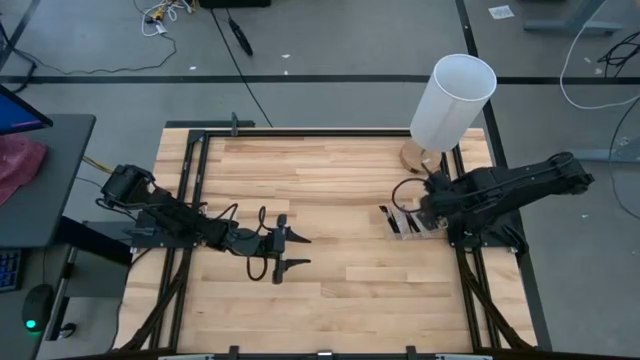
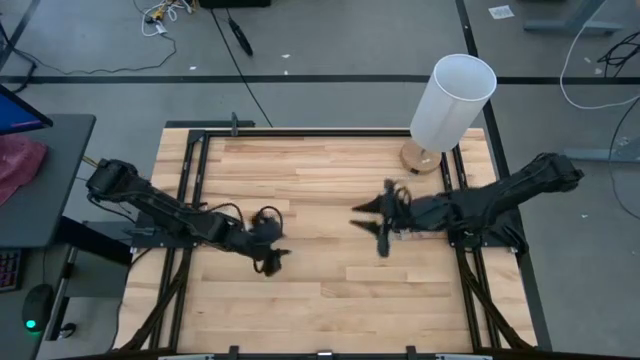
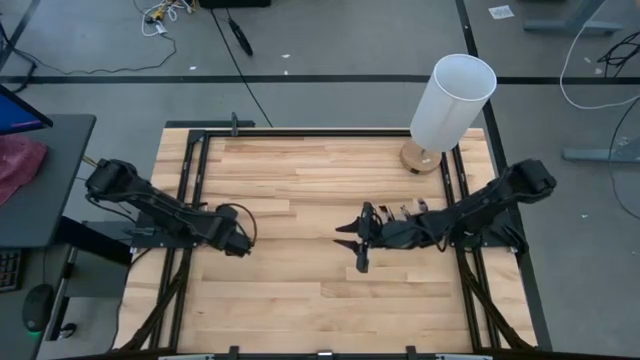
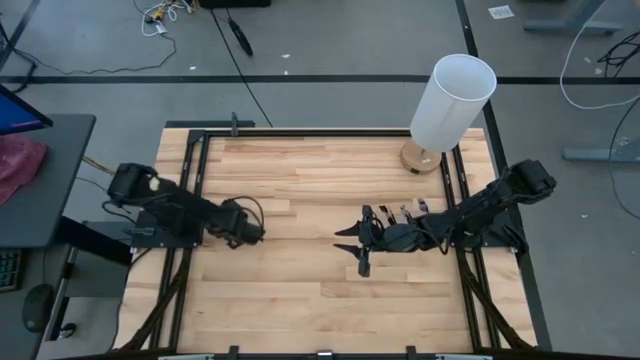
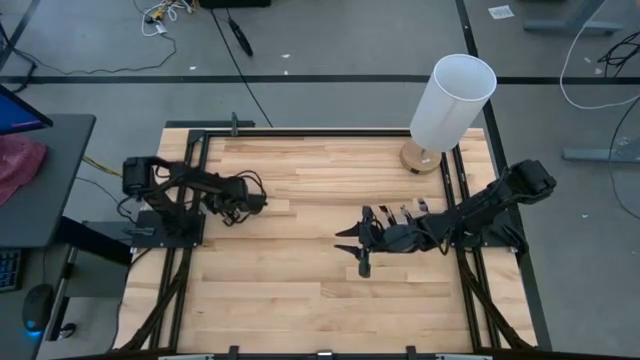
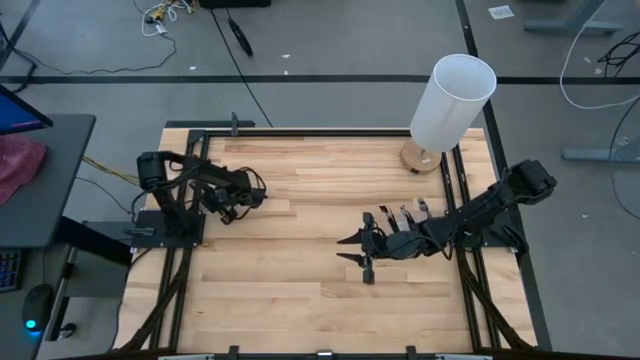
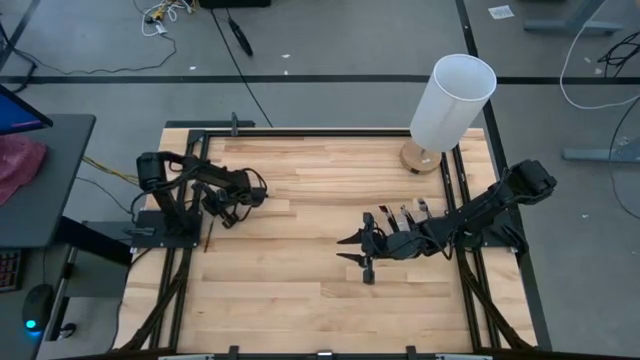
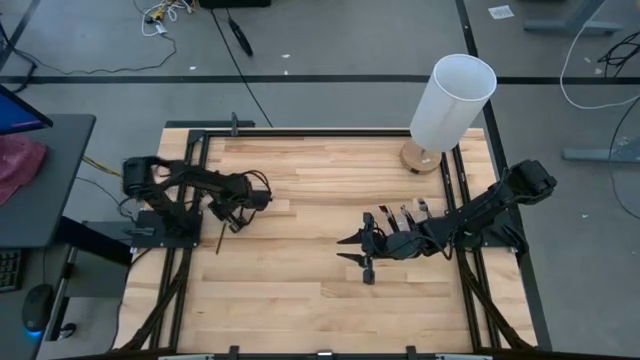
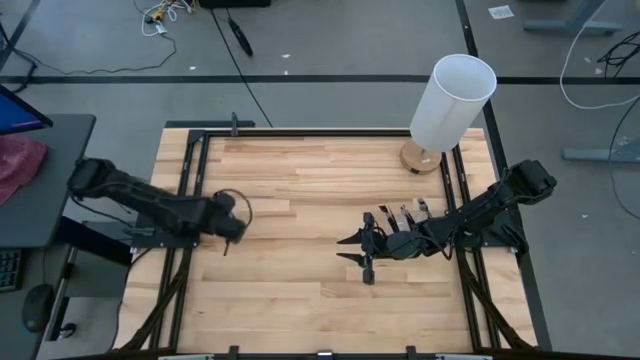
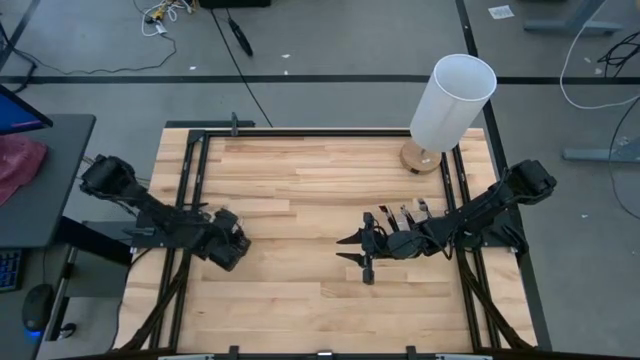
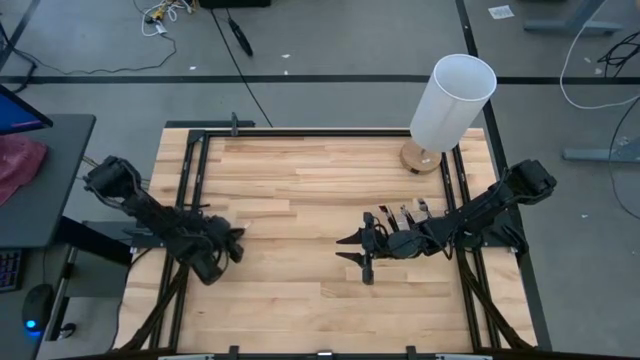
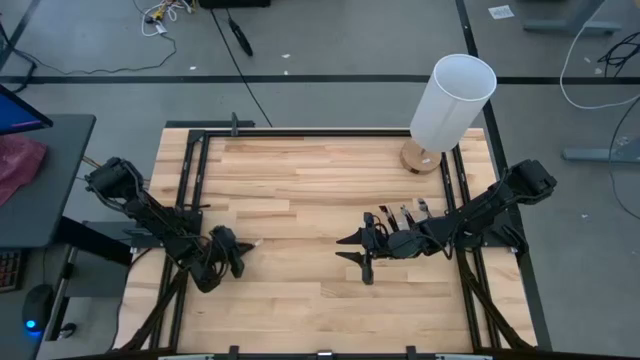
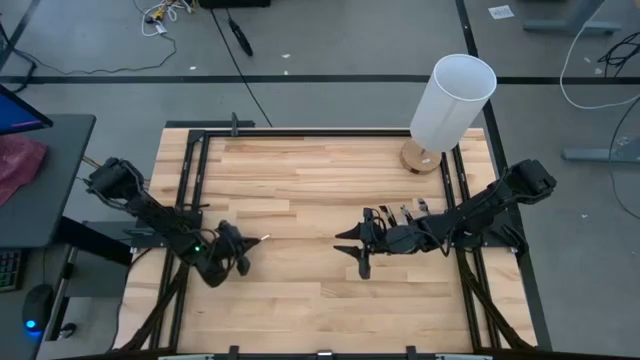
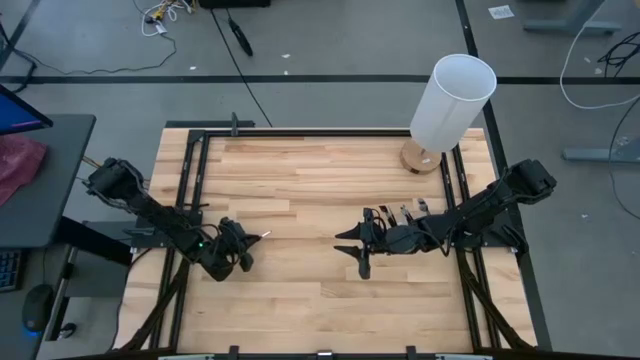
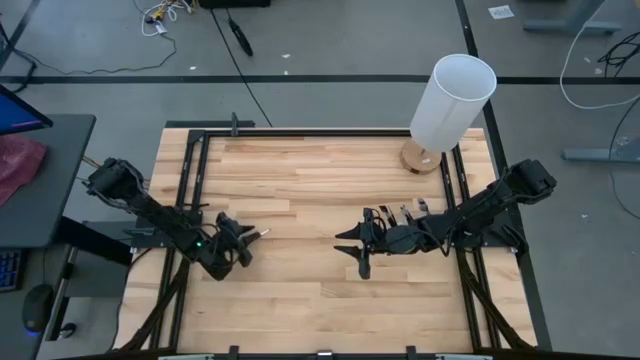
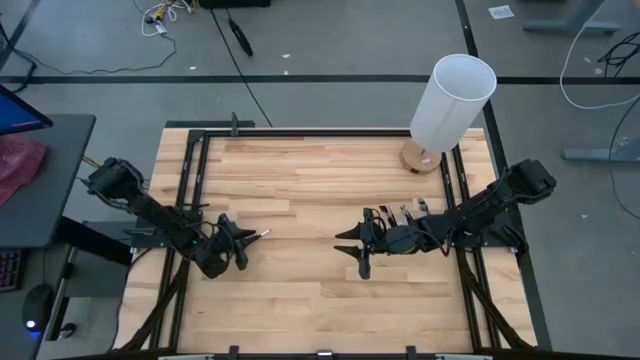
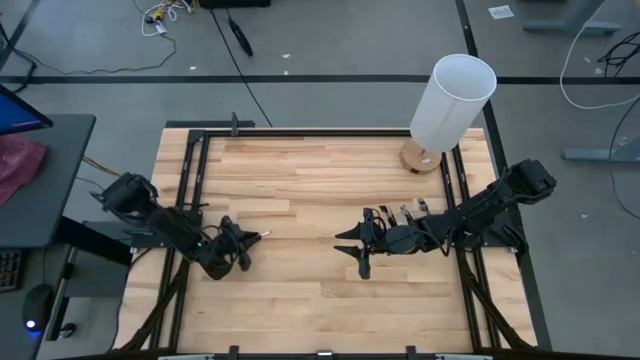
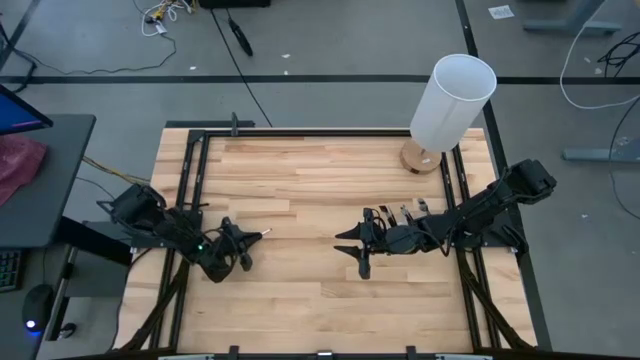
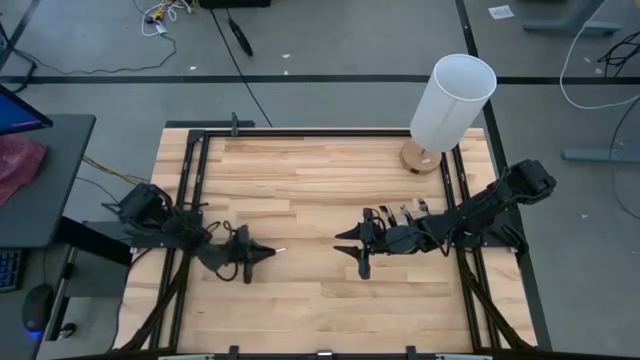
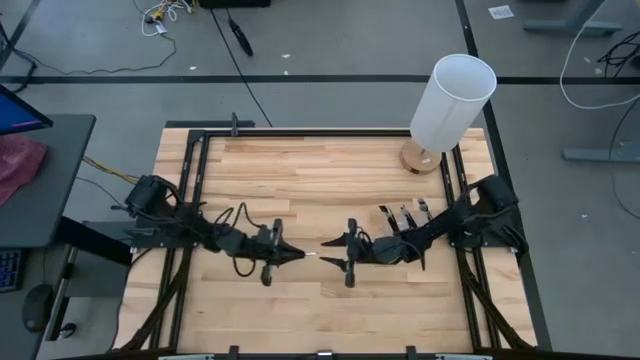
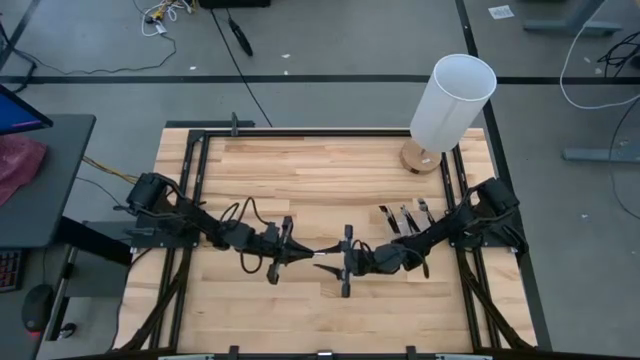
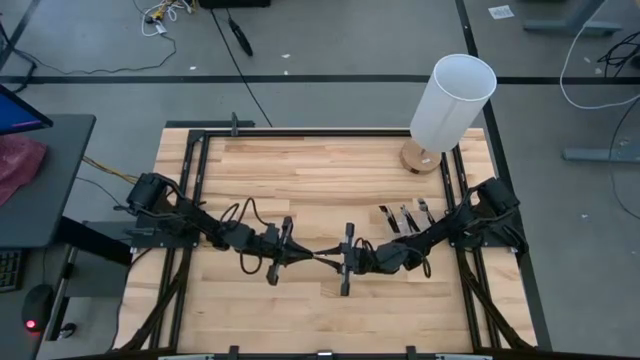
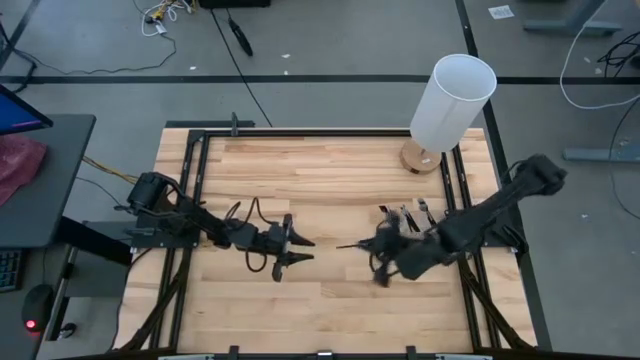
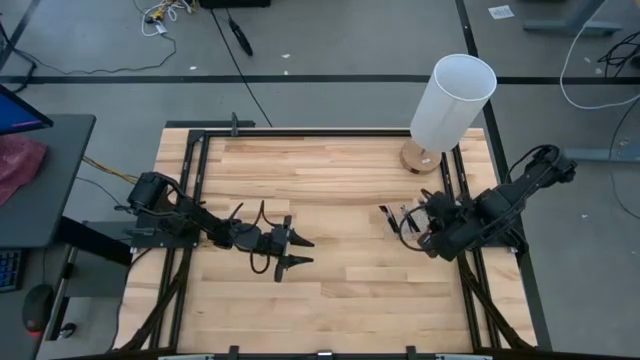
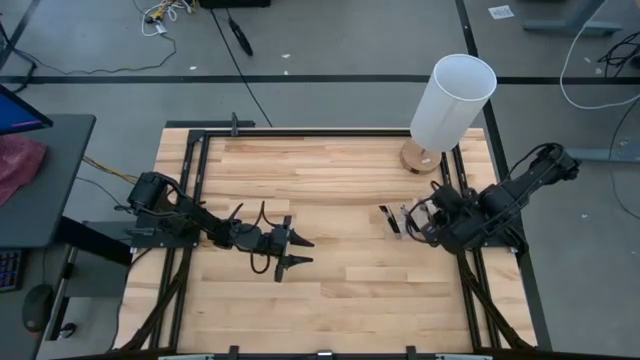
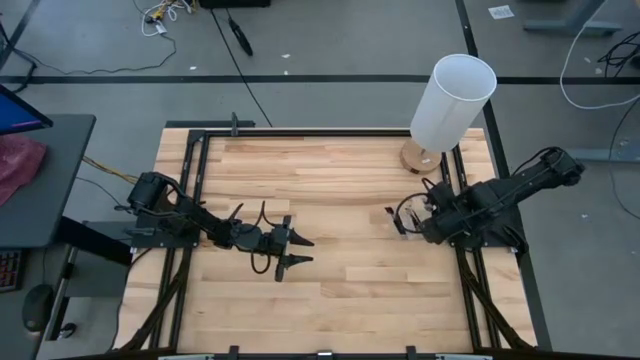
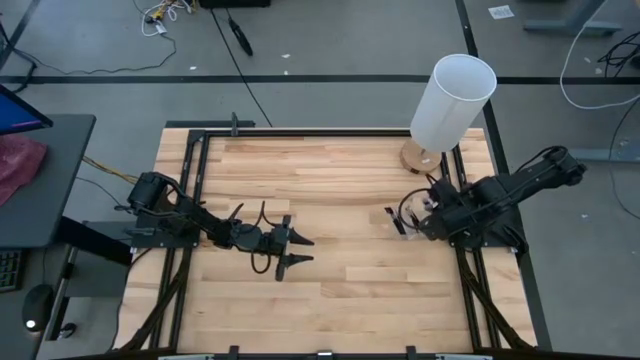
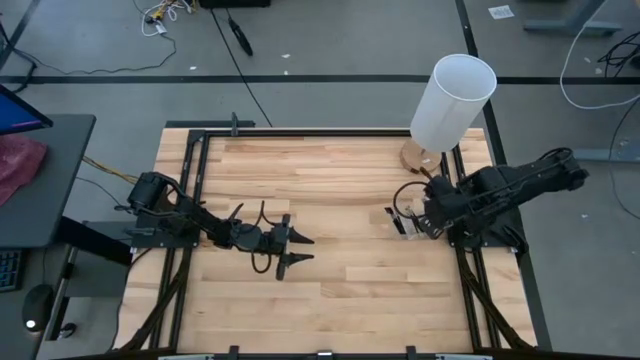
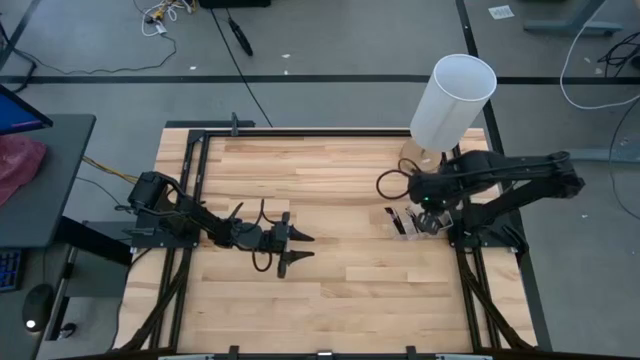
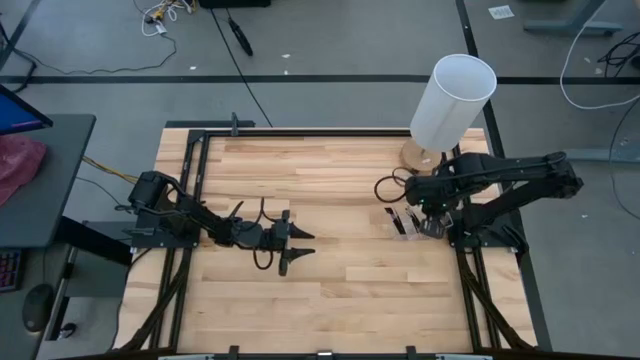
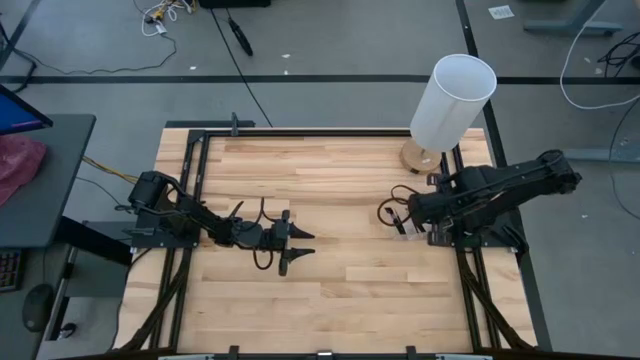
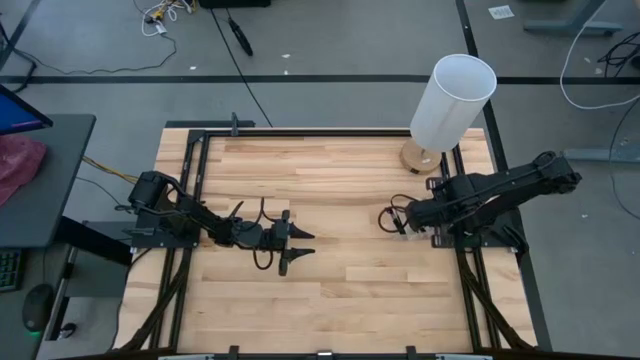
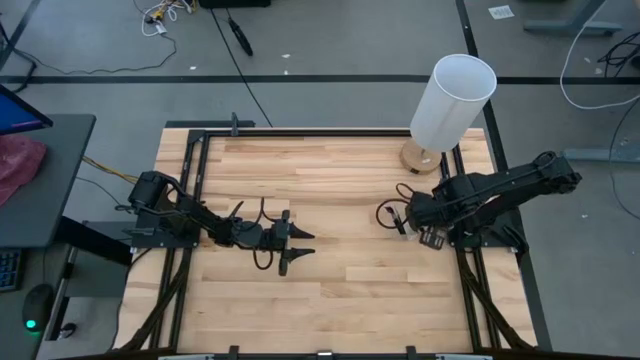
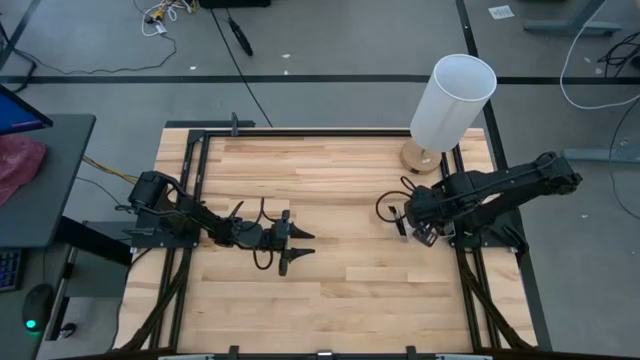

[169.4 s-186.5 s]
Task: Put items in baskets/containers
Put the black eyeshadow brush into the transparent organizer

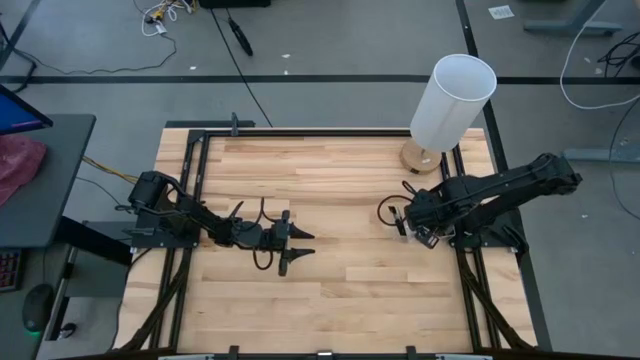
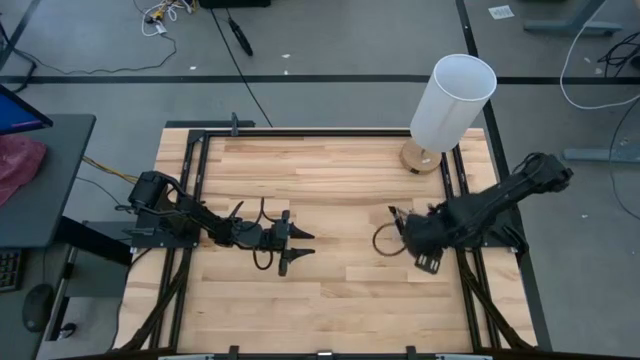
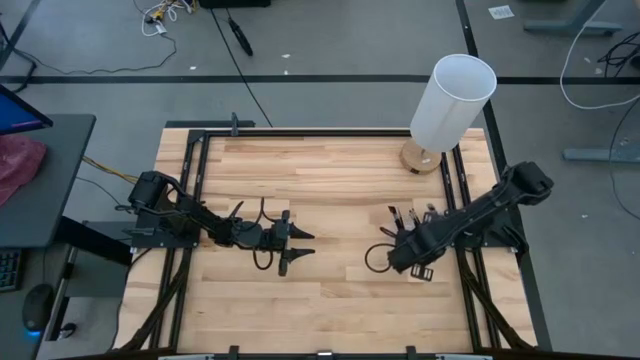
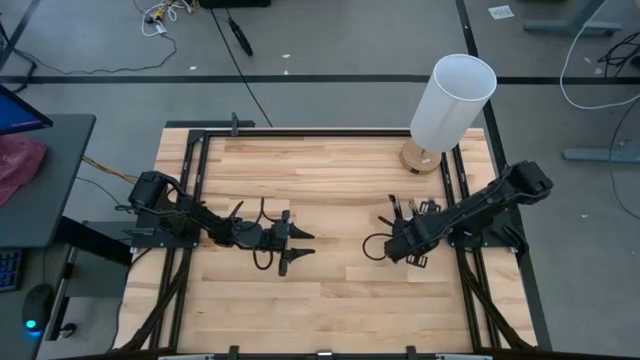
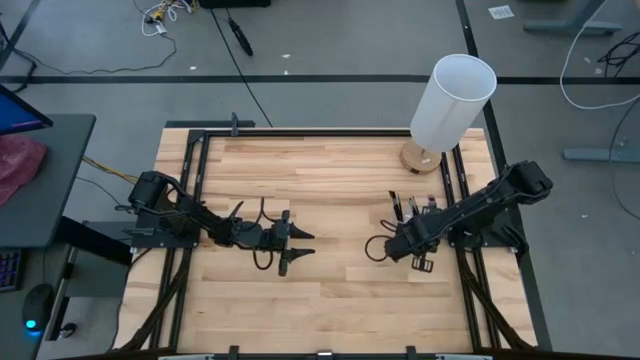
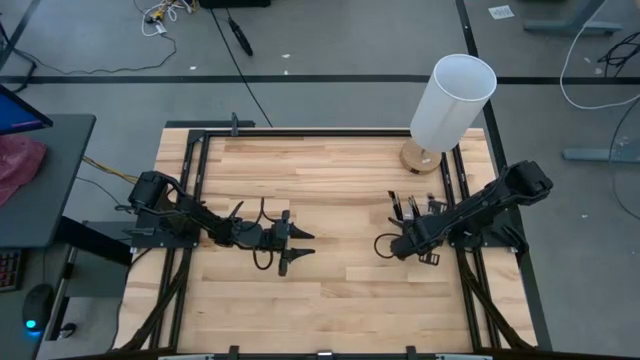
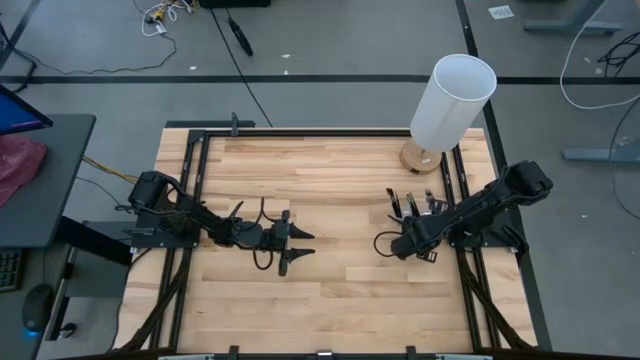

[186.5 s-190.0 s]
Adjust the transparent organizer
